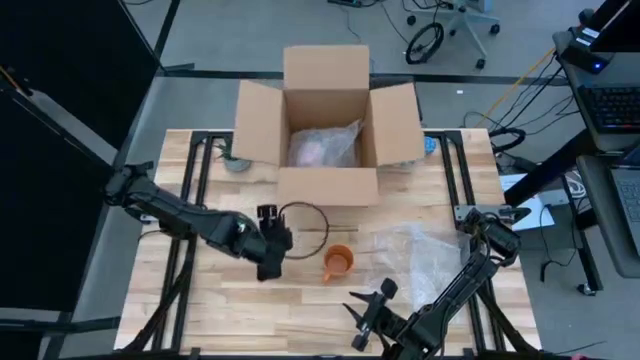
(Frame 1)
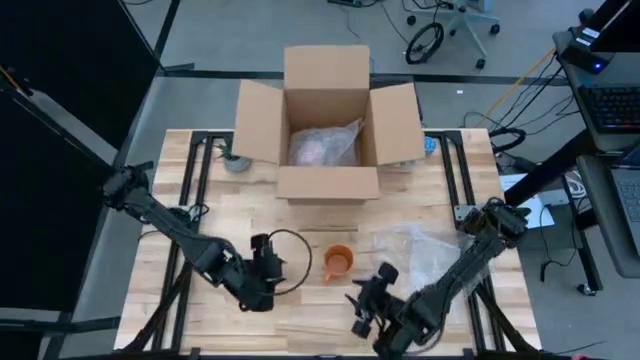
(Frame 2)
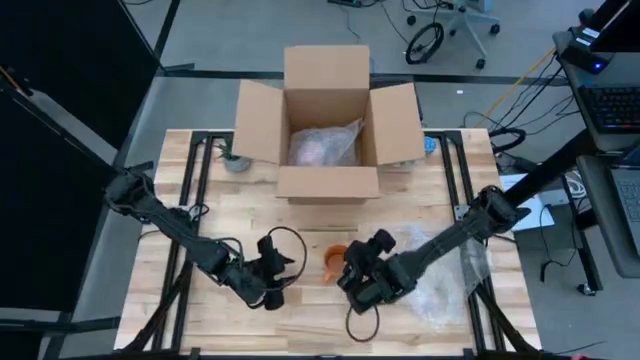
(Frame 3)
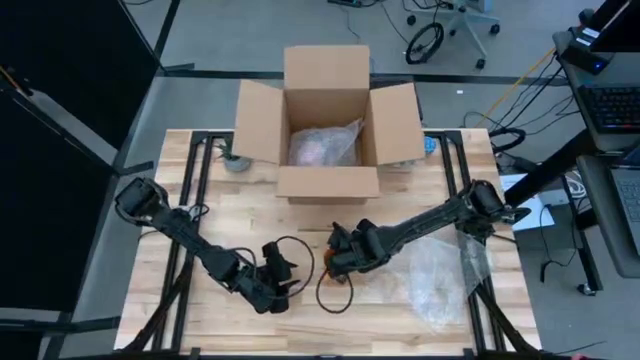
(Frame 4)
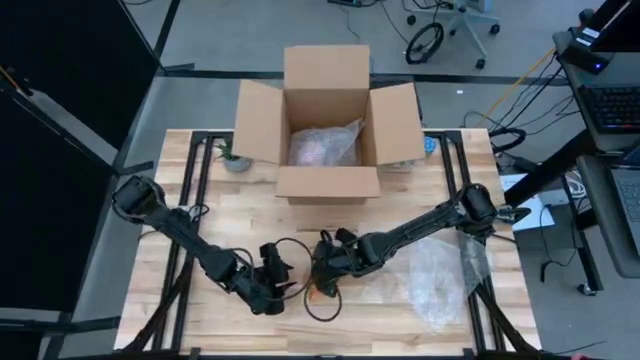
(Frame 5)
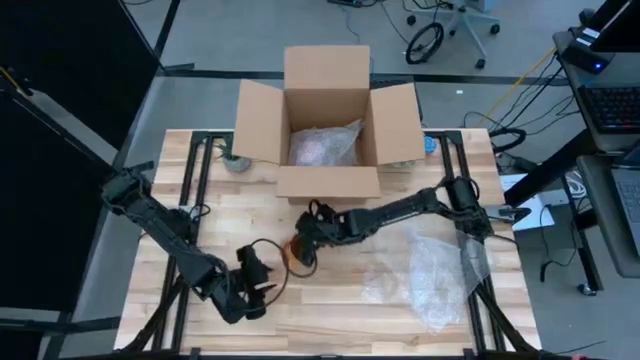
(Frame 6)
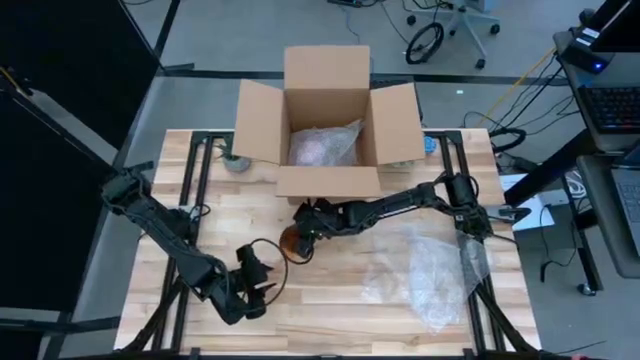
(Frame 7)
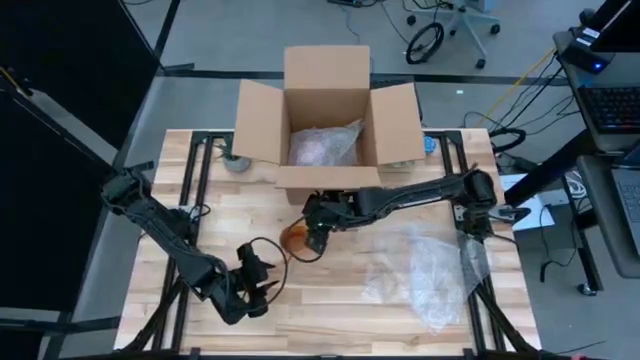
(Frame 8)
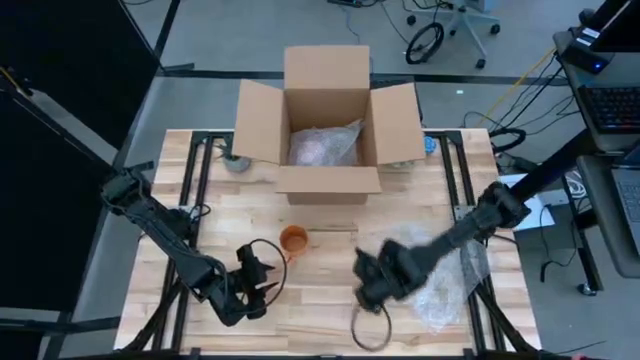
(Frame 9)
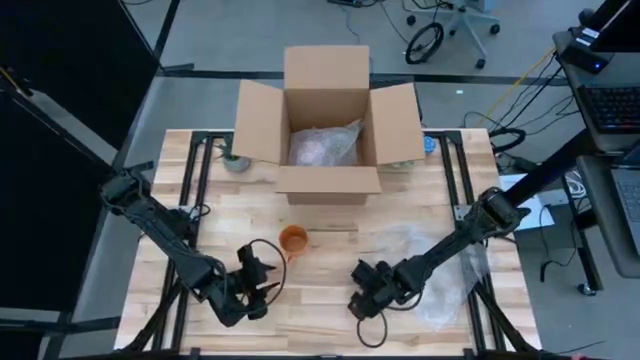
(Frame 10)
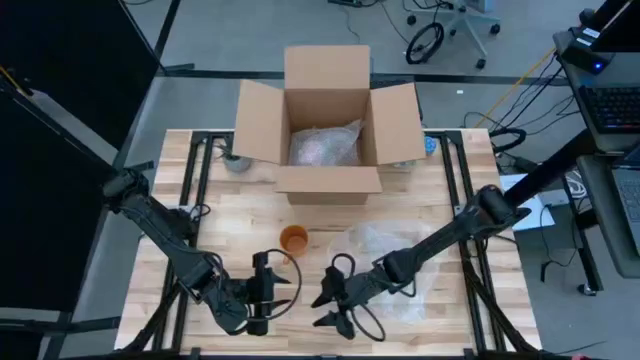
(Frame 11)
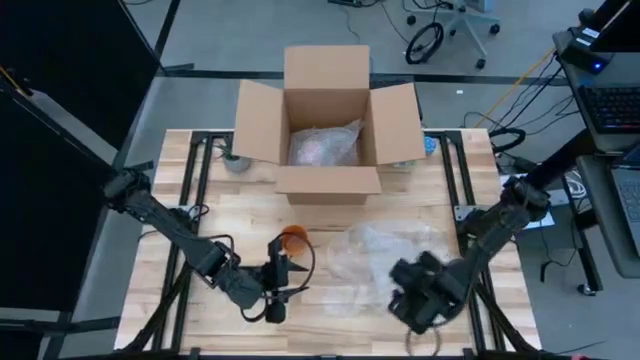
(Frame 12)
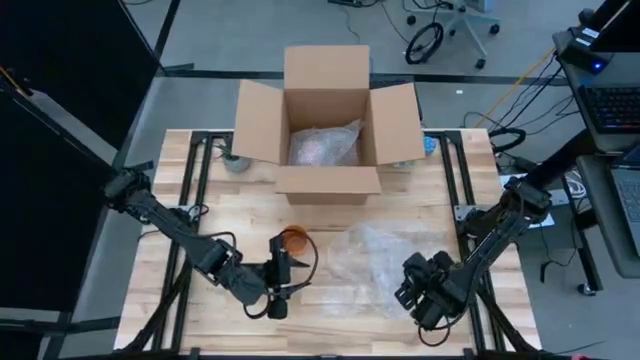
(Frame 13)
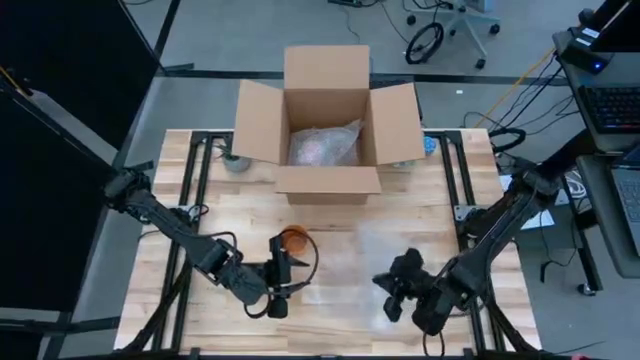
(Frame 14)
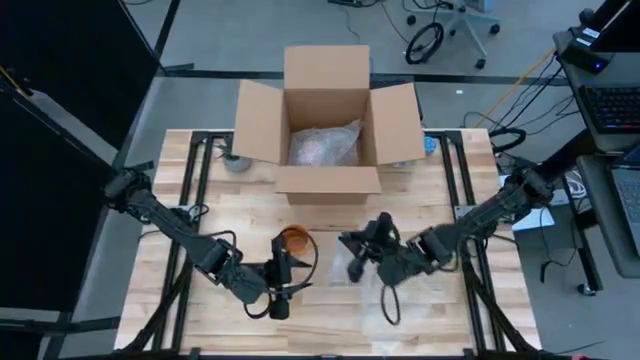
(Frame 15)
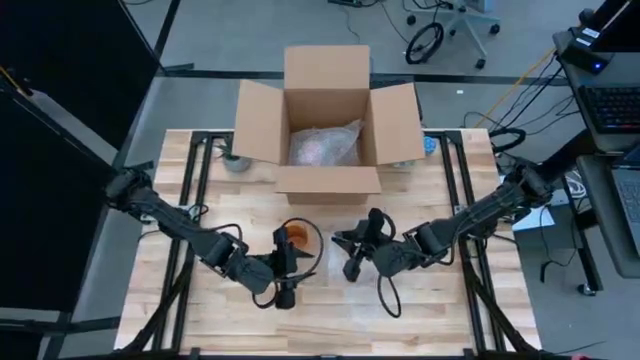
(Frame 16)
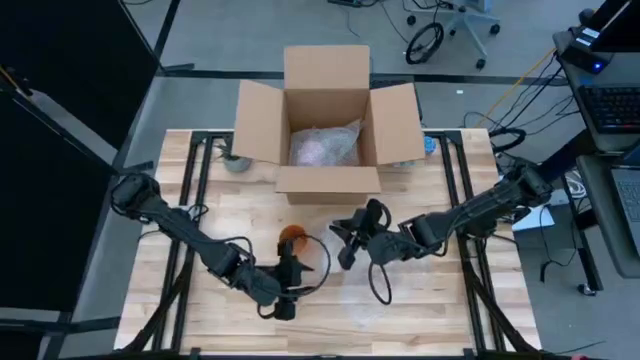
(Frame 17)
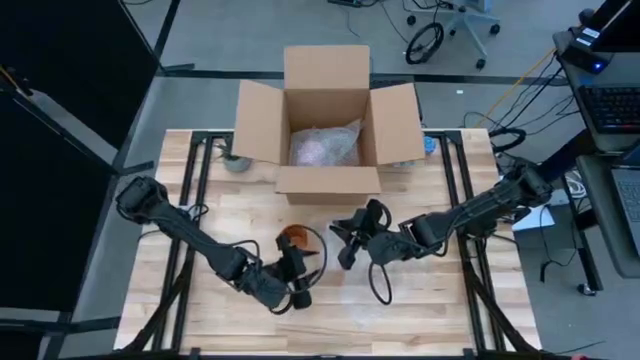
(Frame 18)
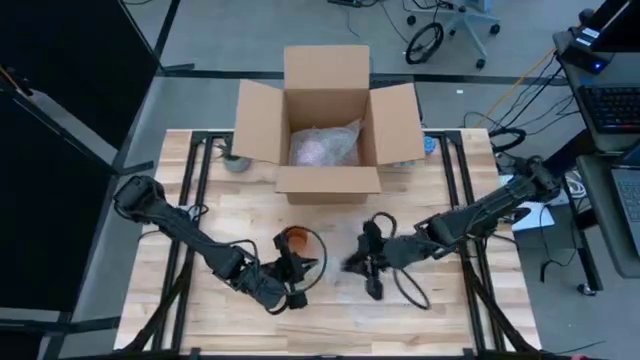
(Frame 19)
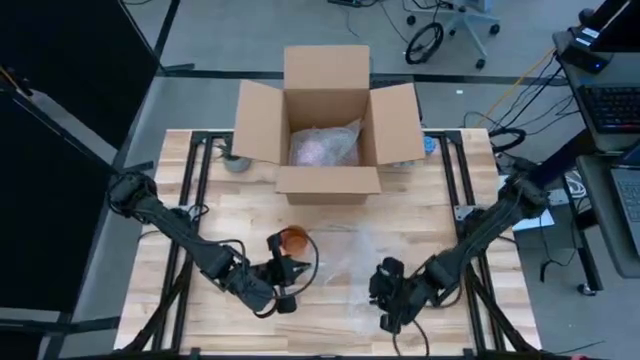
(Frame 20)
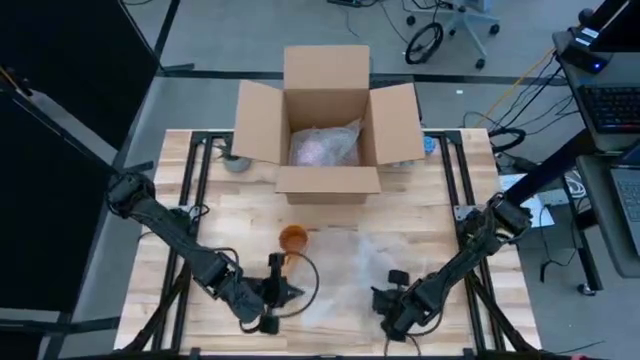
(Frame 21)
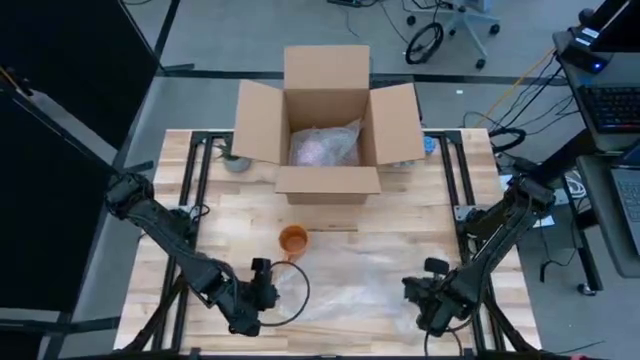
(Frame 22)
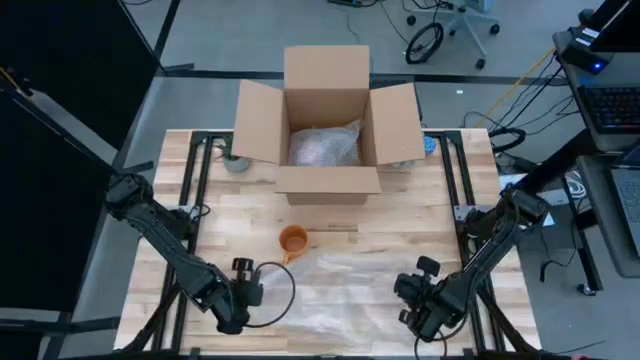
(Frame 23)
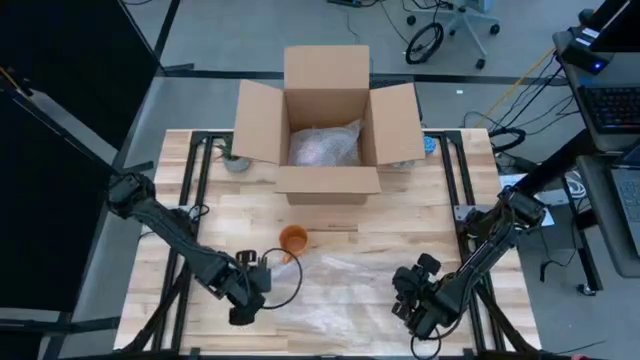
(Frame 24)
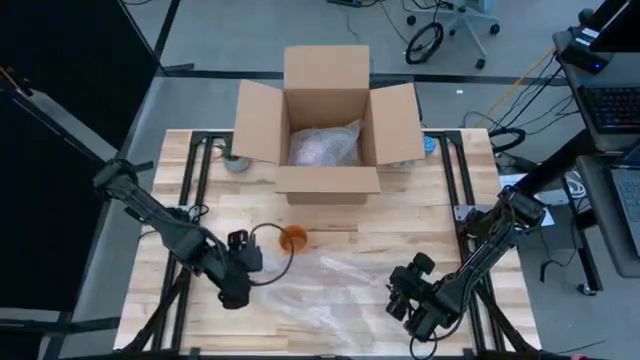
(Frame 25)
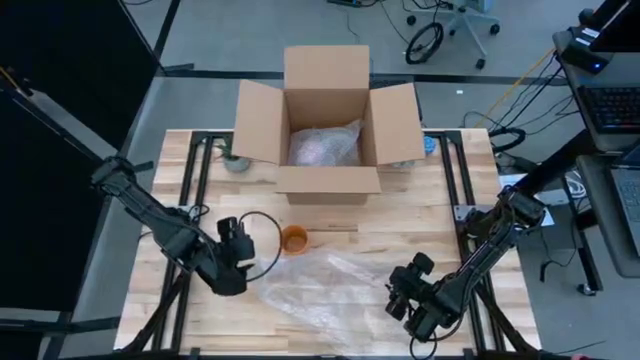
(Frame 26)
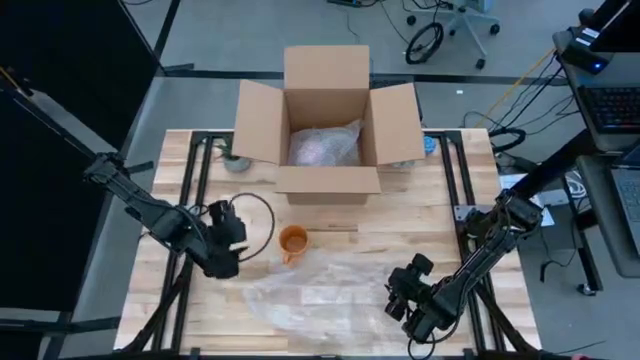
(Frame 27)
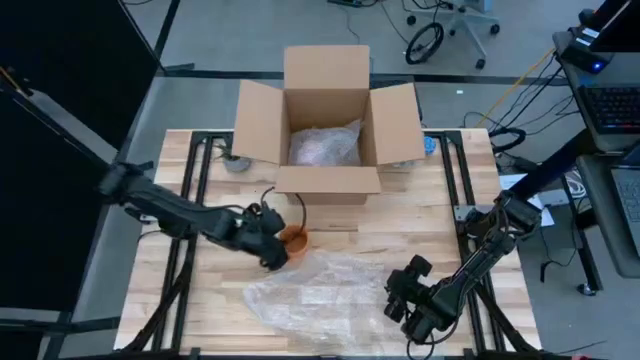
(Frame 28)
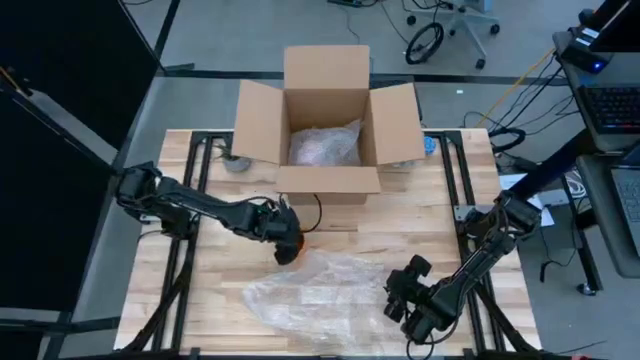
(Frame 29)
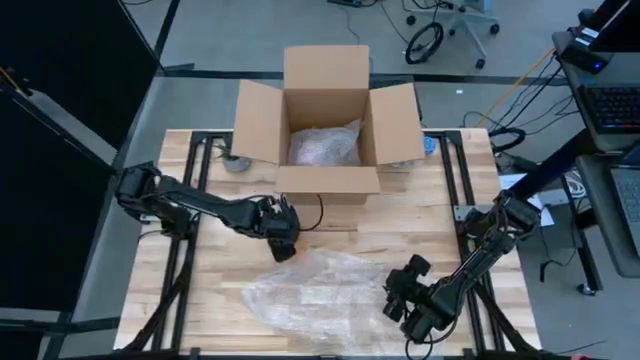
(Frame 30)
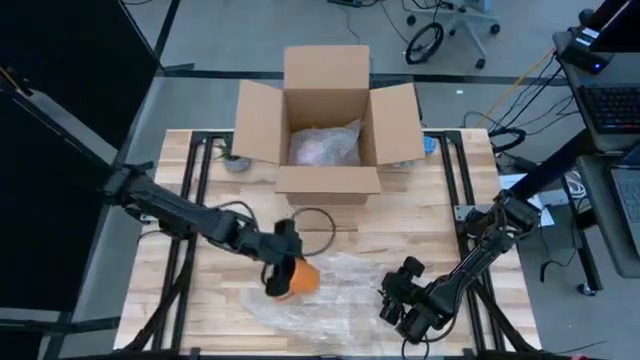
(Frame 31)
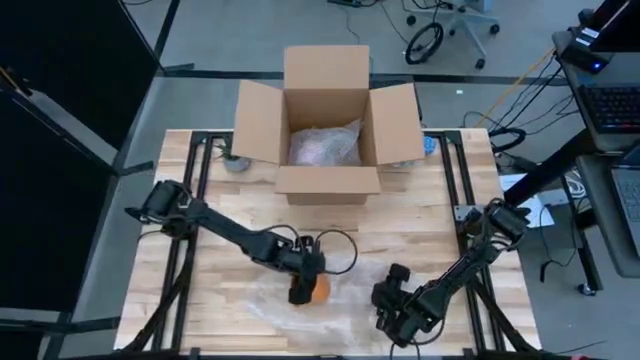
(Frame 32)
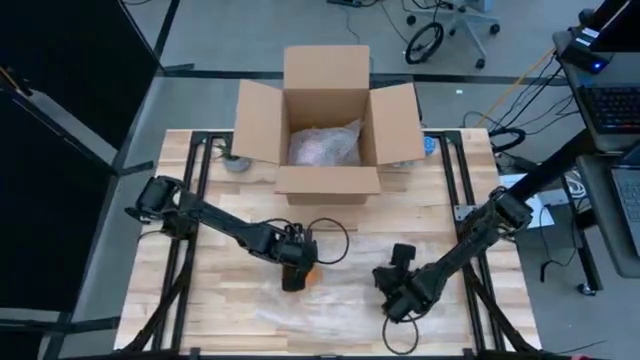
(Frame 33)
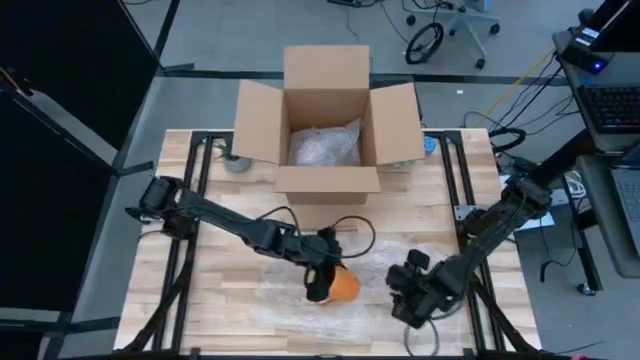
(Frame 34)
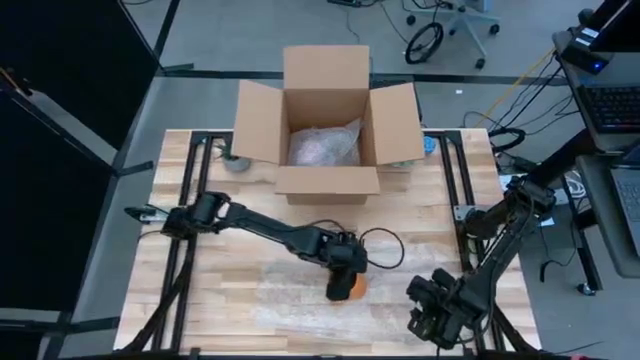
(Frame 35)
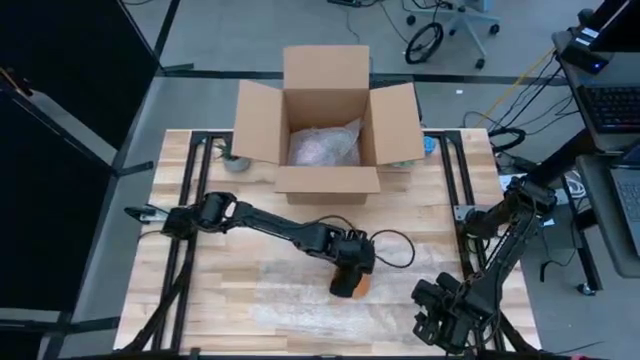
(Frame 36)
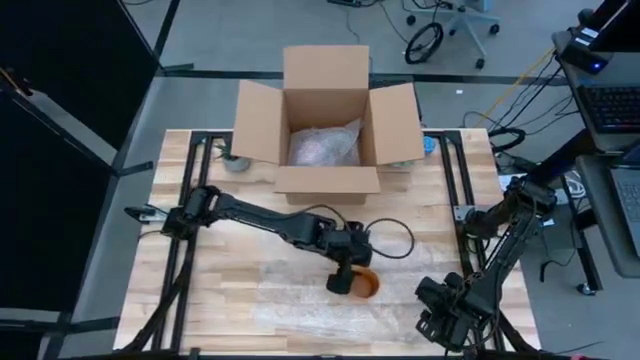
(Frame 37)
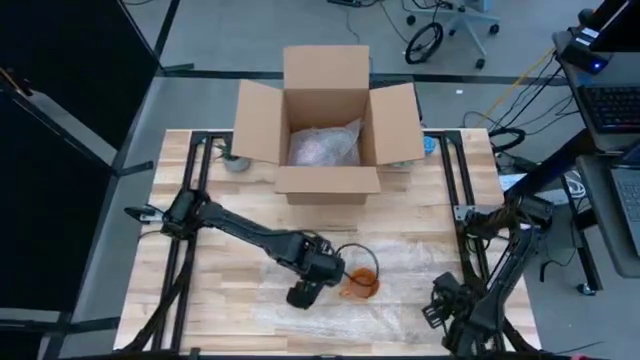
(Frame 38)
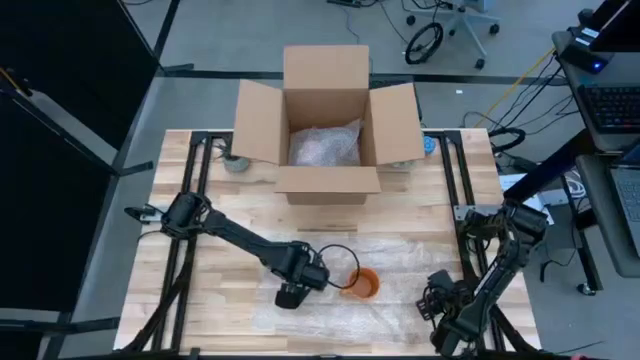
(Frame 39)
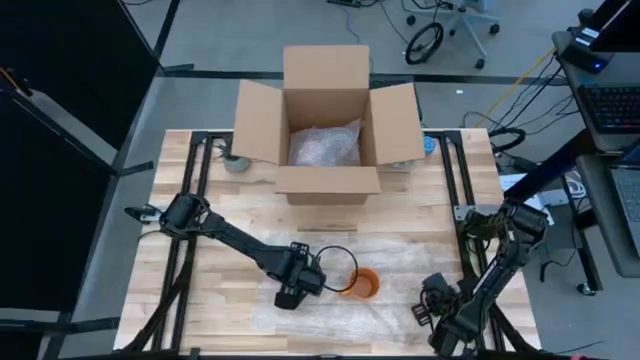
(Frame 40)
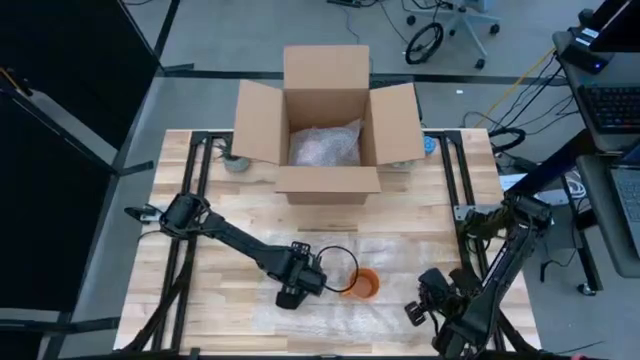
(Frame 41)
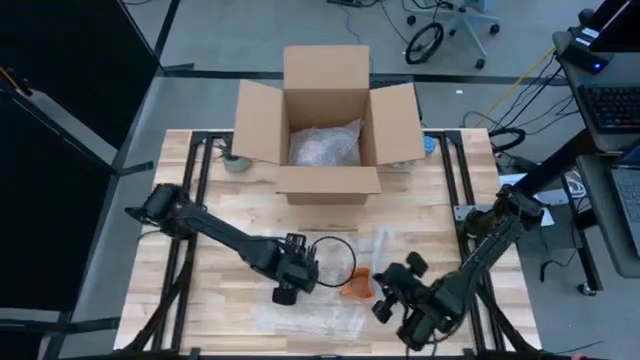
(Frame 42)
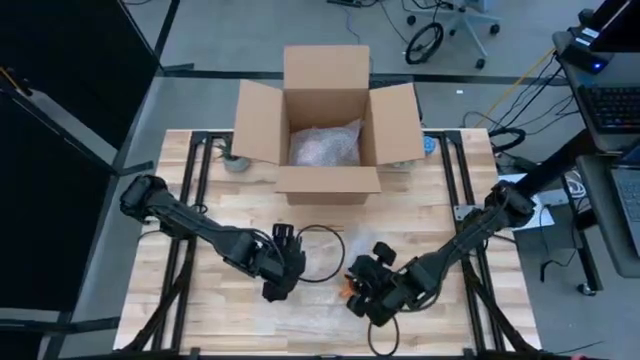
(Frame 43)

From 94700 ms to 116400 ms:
Task: wrap mug
Wrap the orange mug with transparent bubble wrap
